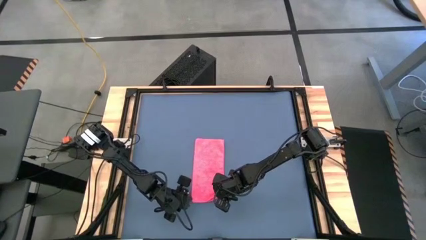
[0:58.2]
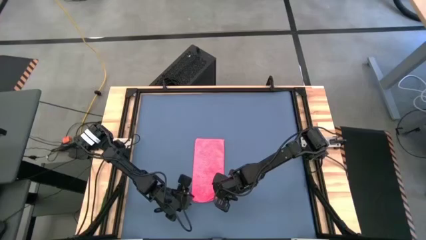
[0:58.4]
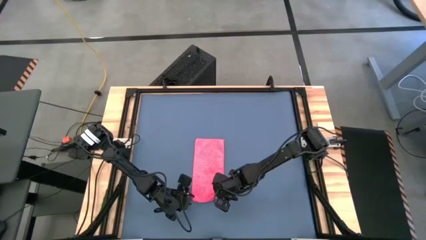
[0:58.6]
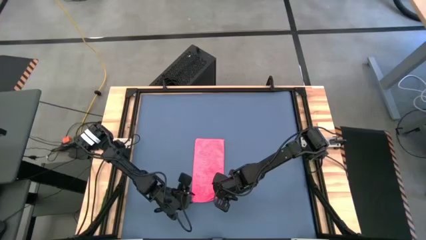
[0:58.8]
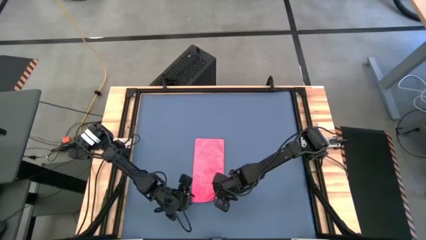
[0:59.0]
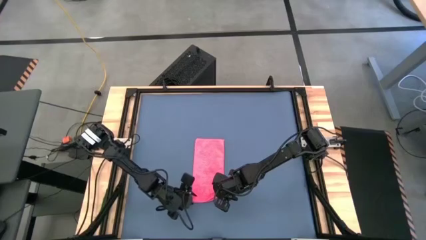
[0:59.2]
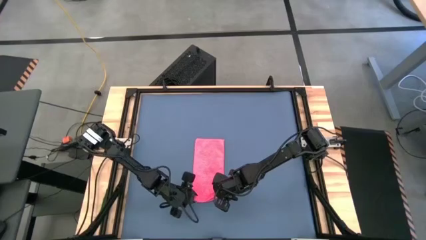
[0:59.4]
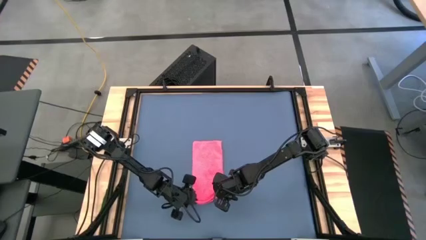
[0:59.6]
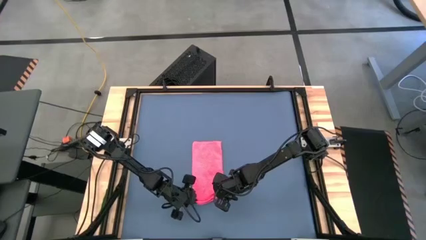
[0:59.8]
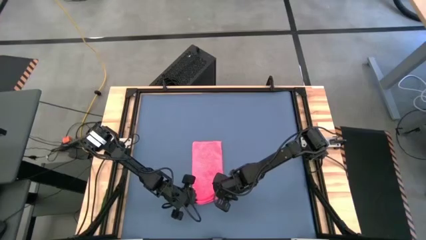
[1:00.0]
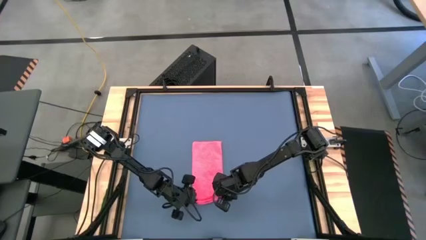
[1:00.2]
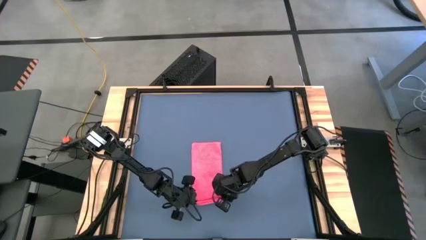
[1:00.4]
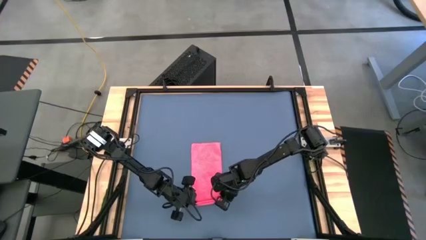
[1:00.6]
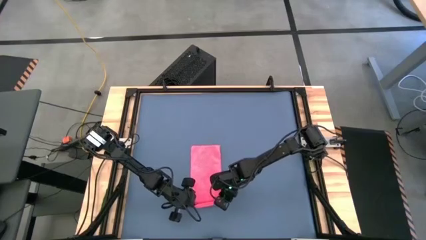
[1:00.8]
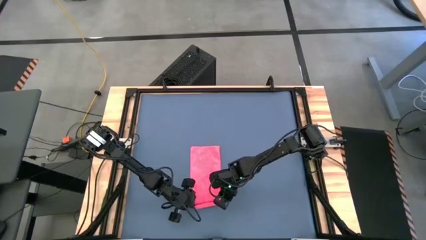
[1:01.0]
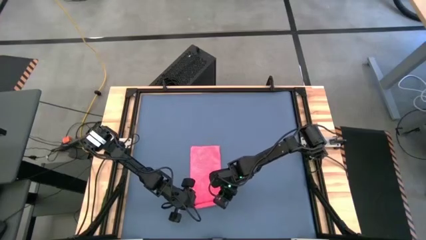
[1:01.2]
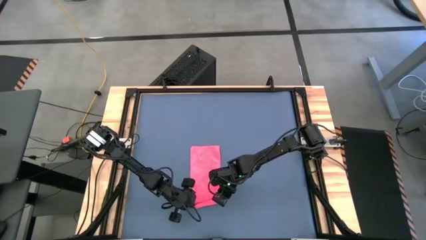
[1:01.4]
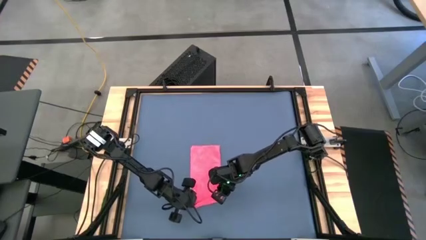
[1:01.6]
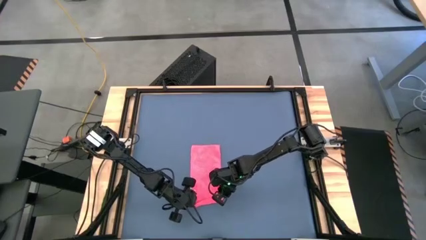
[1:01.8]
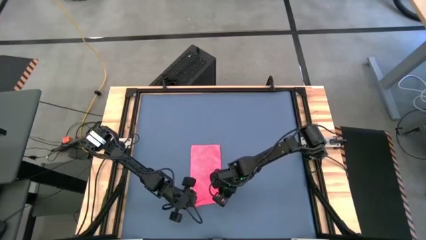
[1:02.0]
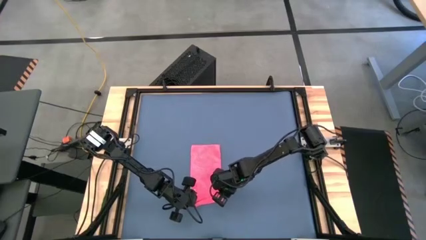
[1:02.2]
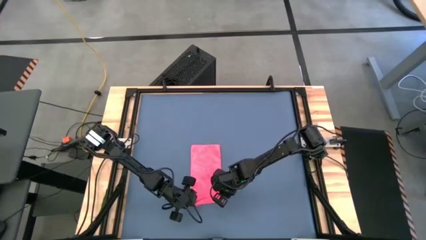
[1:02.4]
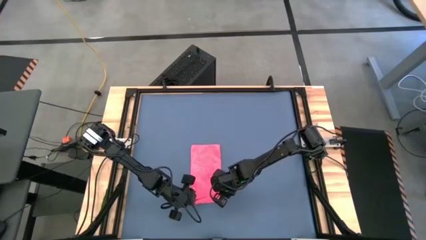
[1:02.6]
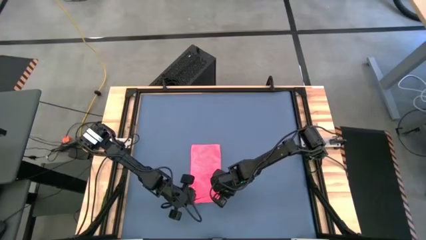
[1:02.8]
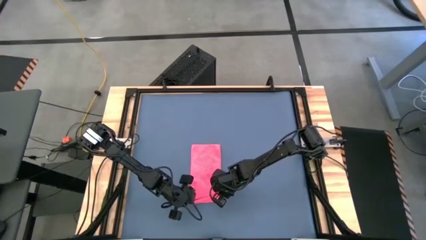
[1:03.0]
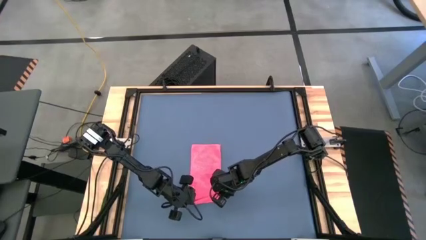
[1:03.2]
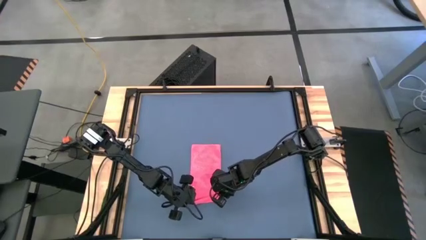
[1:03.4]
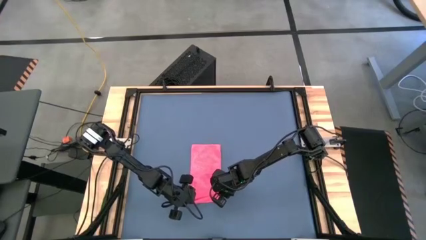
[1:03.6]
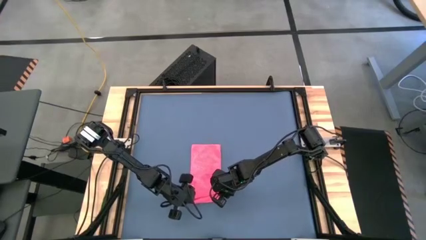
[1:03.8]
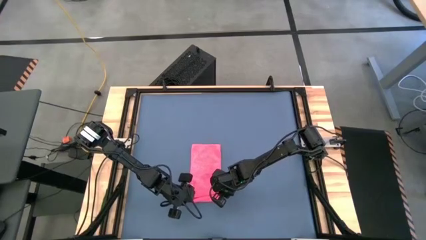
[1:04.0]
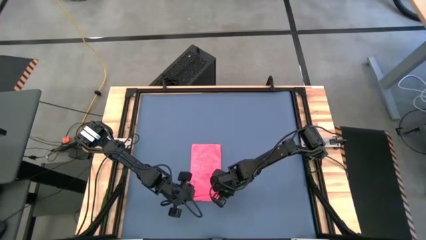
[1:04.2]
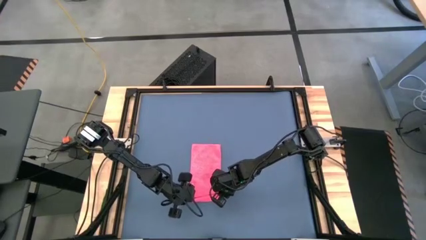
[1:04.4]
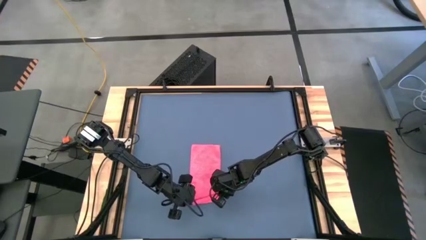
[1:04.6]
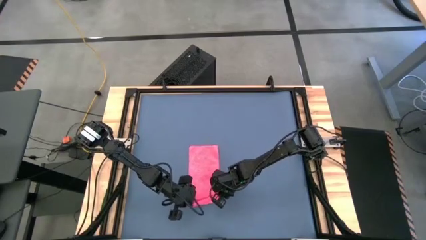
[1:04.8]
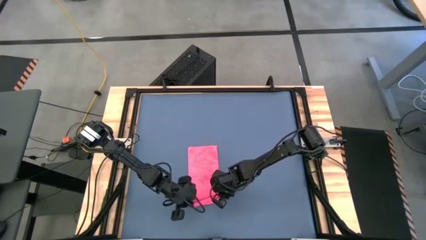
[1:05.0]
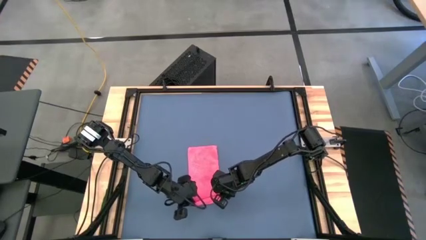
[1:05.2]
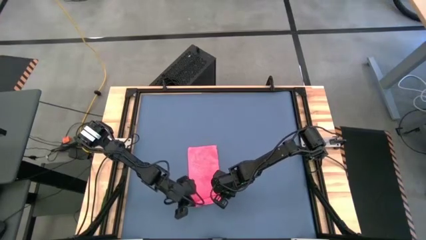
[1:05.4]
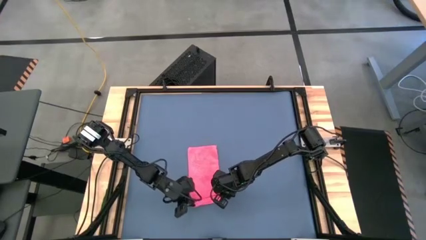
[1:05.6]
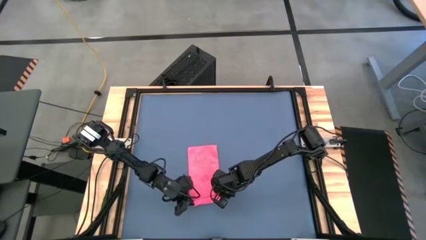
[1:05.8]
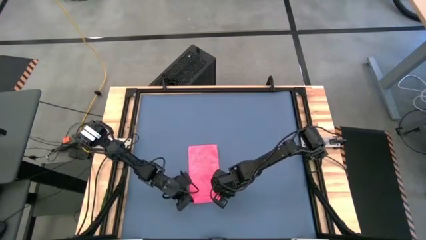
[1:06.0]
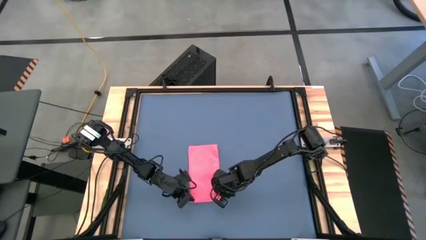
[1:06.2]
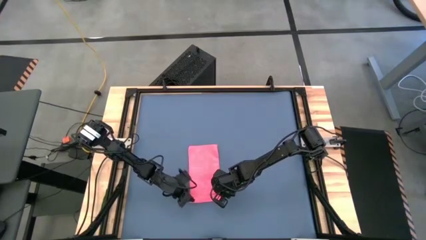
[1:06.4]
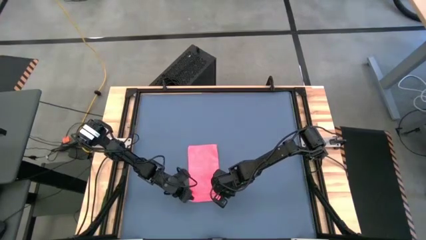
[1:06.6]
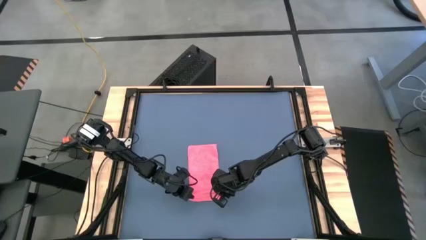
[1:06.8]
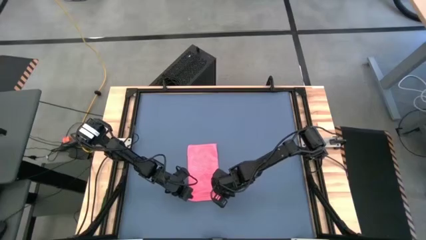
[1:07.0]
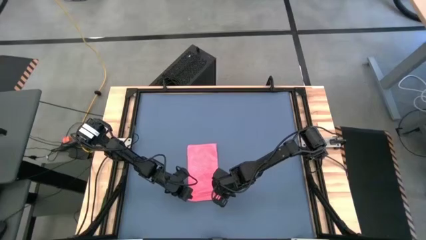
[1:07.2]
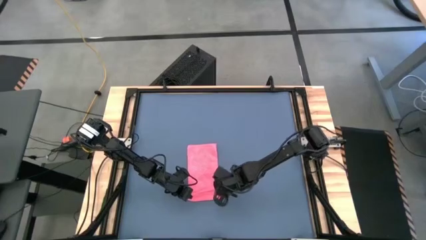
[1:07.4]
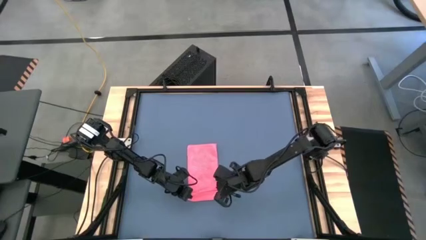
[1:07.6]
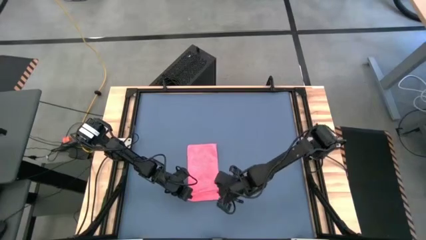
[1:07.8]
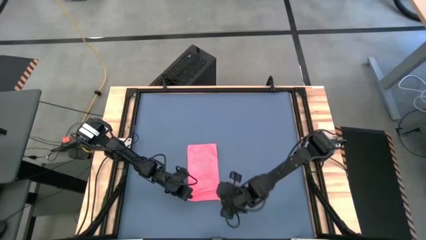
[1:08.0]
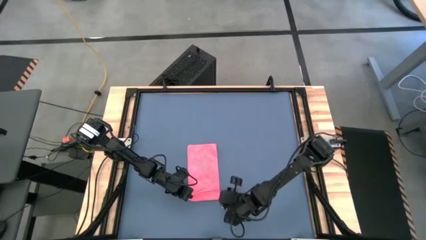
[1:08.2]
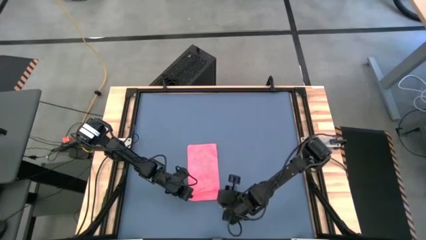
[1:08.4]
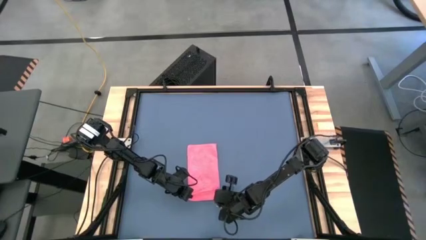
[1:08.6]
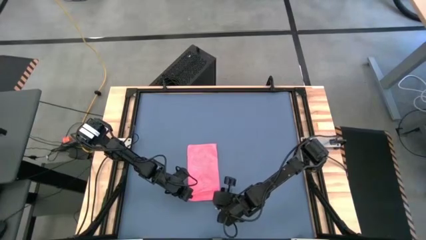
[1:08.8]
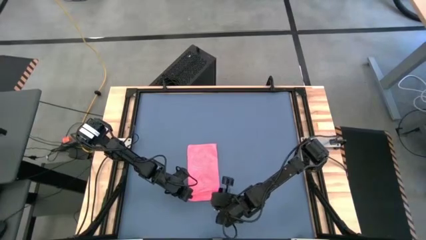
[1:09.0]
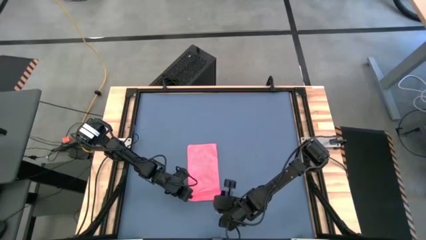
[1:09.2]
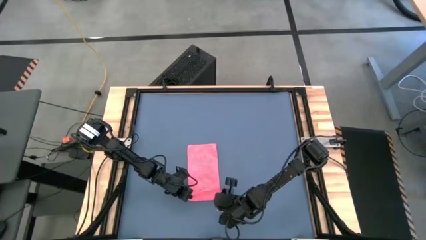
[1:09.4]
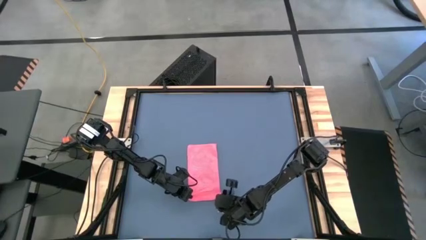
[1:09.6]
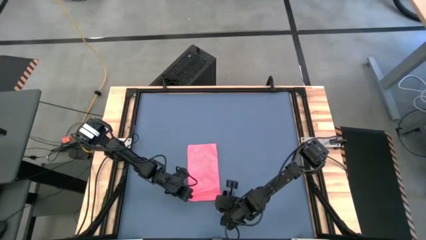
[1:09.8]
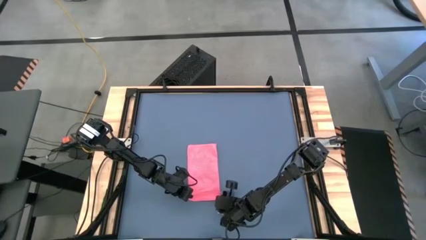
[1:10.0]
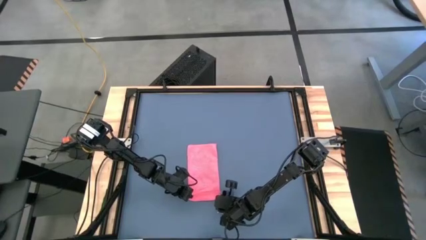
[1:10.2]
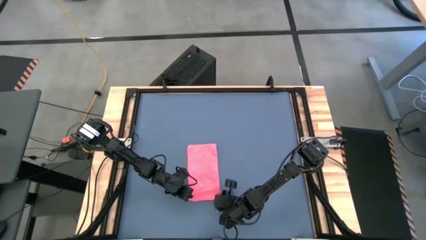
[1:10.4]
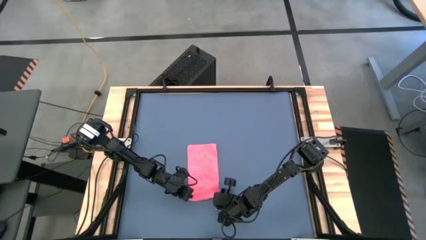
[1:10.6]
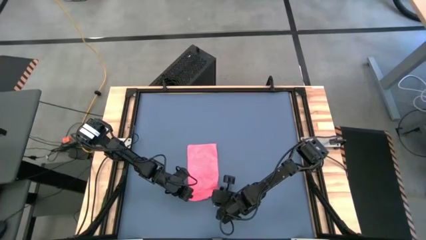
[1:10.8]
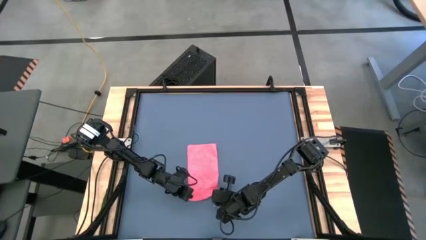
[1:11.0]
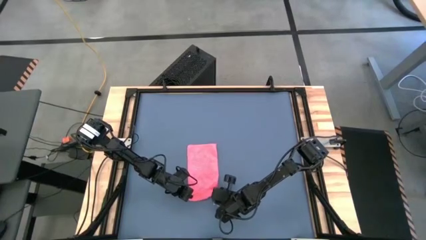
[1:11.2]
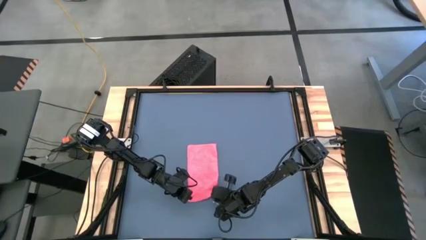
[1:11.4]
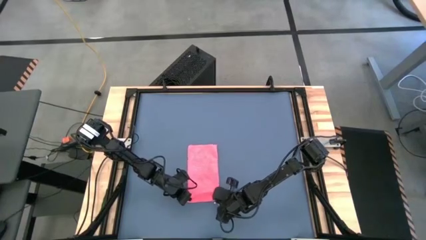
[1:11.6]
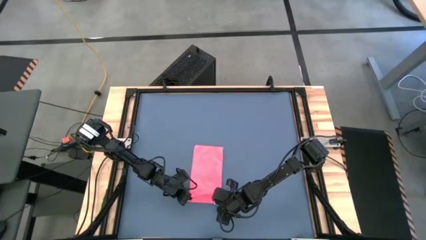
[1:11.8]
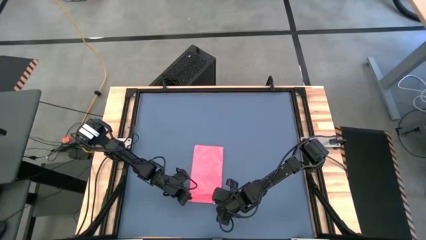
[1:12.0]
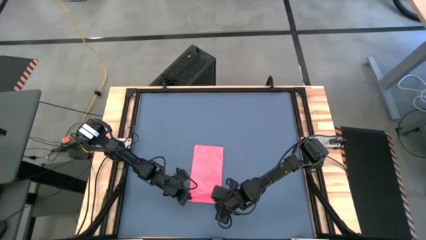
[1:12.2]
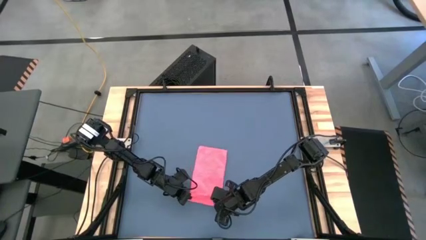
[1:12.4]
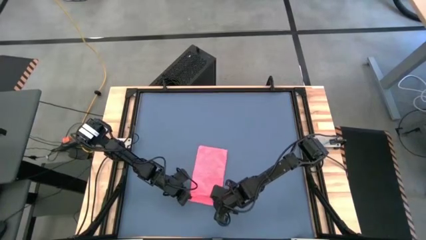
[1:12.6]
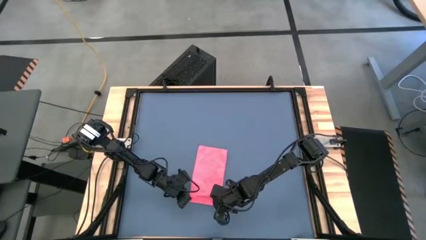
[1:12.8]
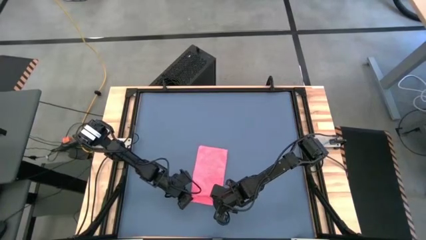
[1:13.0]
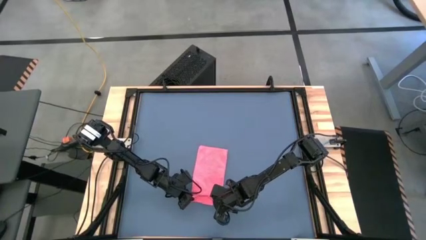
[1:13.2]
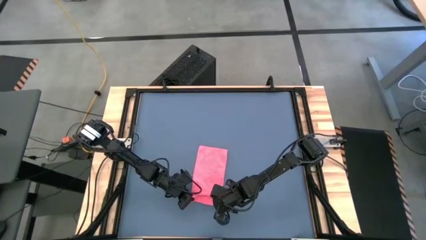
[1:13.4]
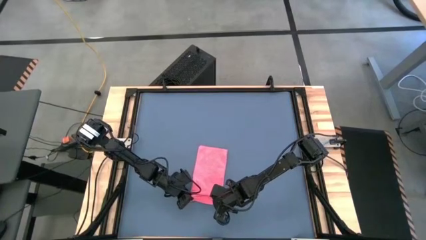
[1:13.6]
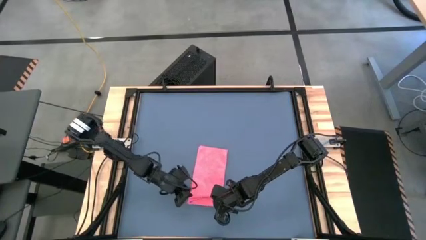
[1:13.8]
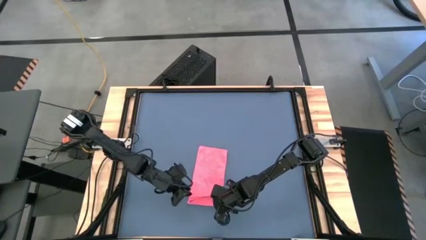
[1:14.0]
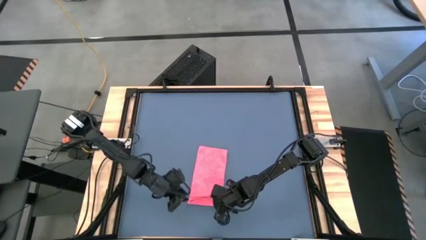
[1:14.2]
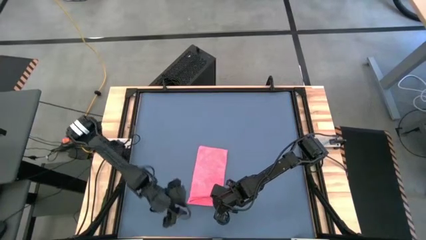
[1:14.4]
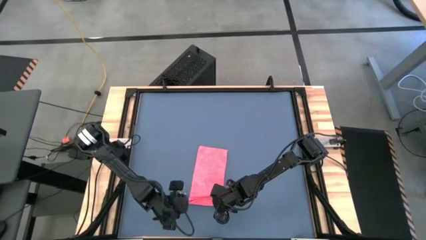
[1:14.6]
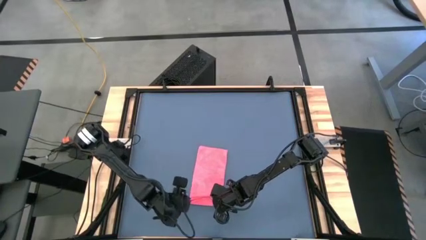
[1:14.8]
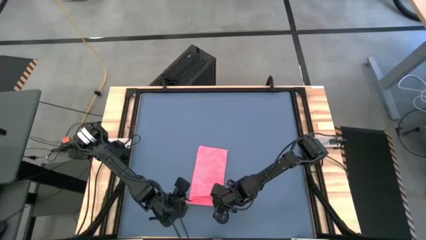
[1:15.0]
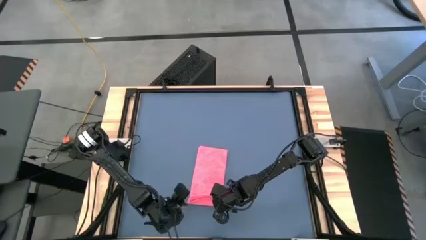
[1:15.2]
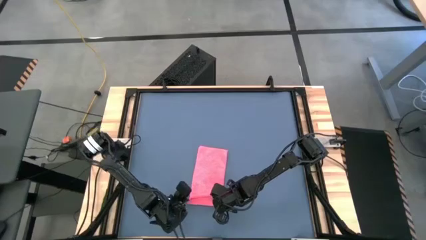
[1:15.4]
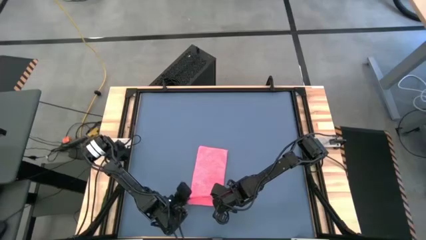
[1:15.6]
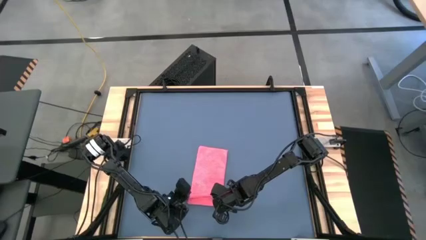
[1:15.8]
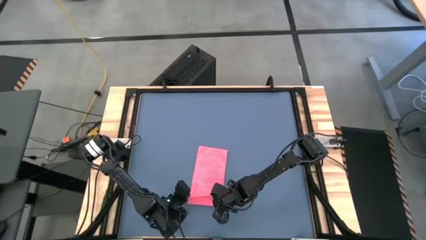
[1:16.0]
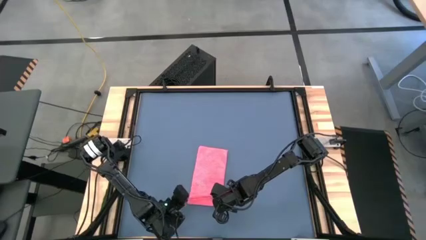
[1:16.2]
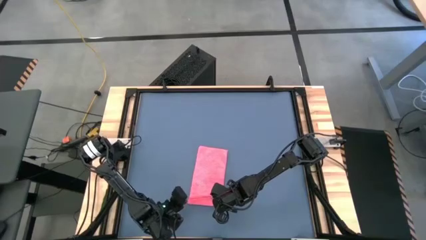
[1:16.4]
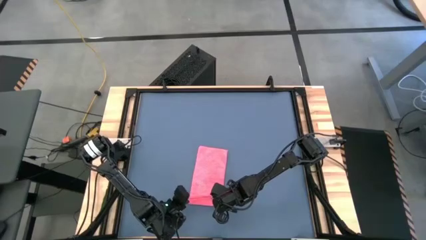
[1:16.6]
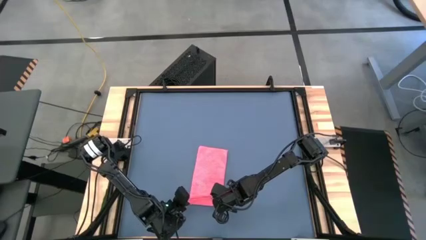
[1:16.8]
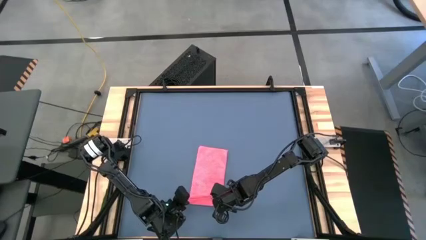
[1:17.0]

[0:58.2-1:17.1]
Task: Roll towel
Roll the pink towel
